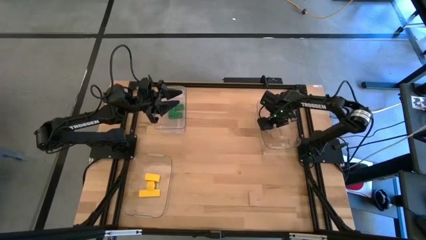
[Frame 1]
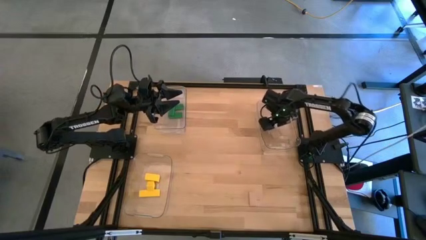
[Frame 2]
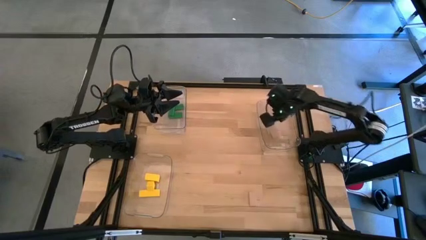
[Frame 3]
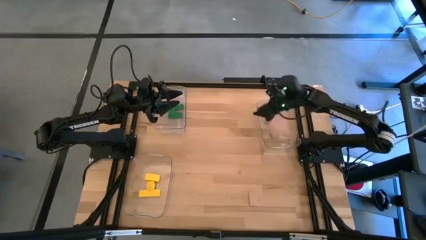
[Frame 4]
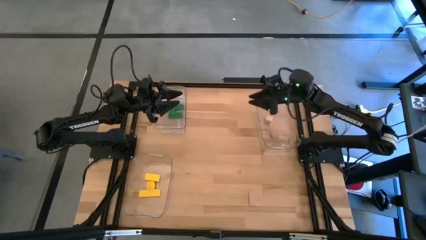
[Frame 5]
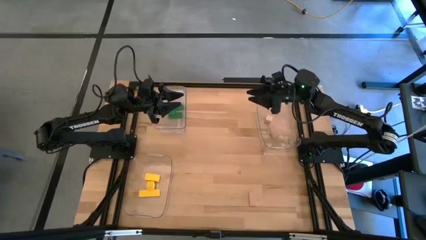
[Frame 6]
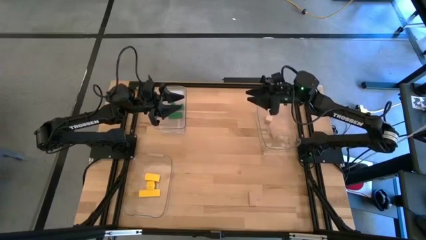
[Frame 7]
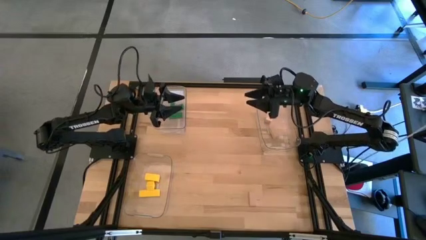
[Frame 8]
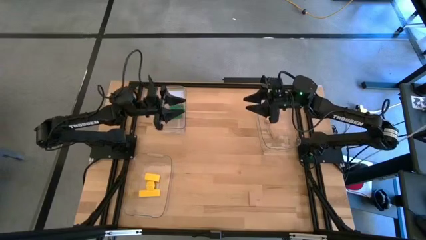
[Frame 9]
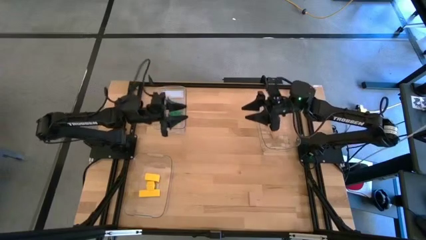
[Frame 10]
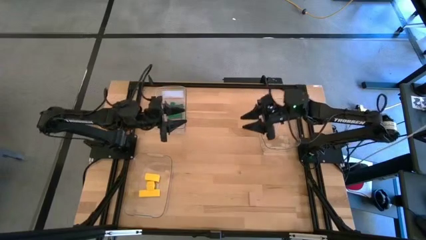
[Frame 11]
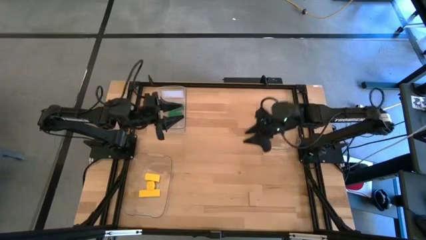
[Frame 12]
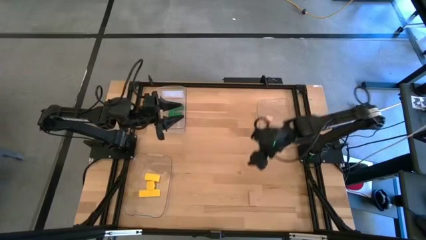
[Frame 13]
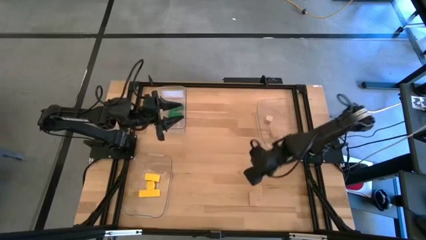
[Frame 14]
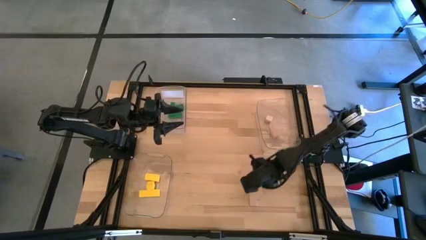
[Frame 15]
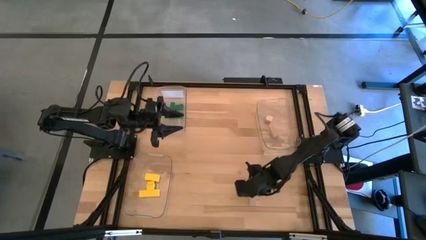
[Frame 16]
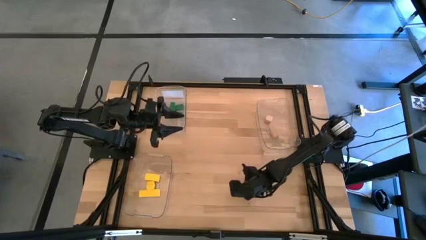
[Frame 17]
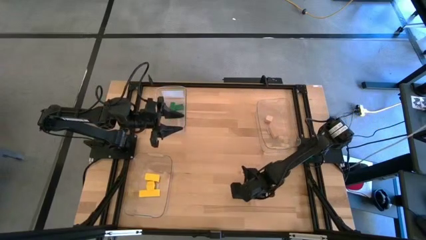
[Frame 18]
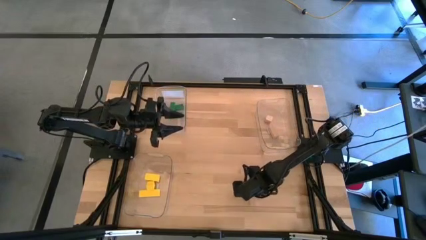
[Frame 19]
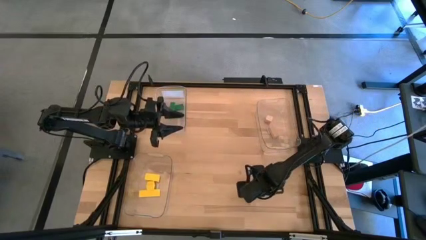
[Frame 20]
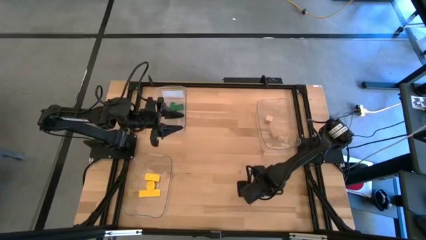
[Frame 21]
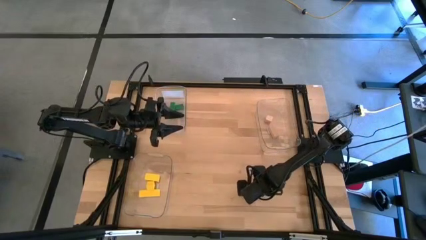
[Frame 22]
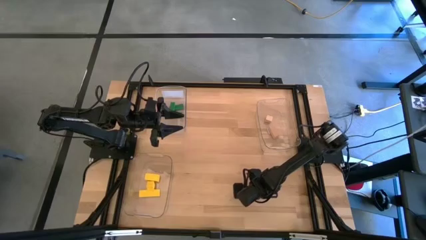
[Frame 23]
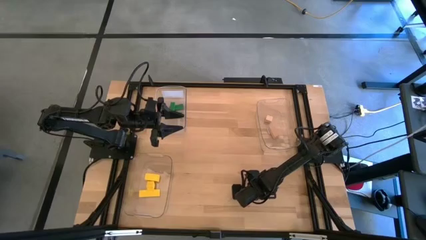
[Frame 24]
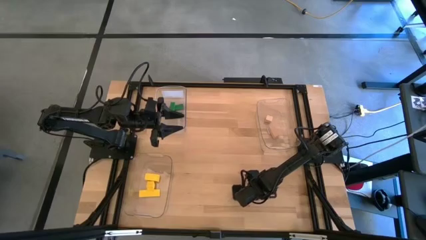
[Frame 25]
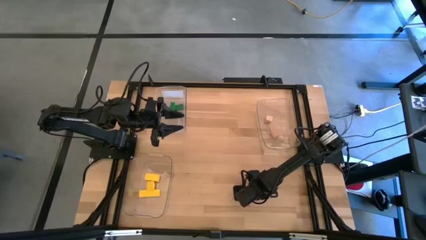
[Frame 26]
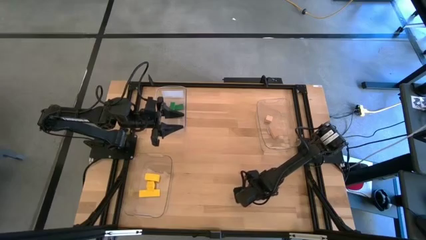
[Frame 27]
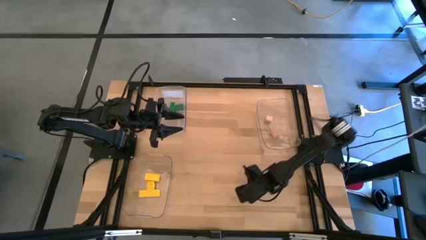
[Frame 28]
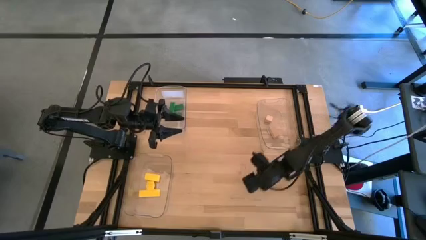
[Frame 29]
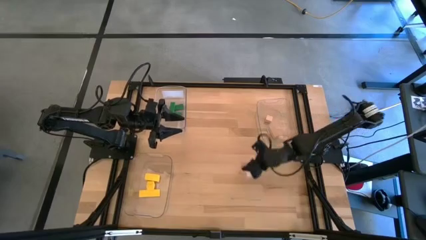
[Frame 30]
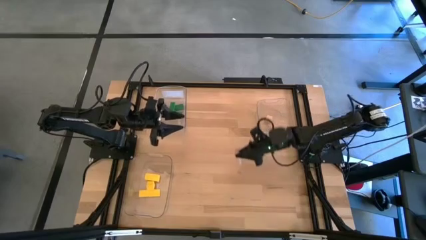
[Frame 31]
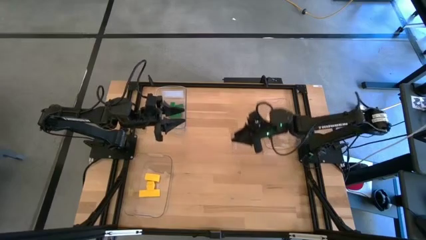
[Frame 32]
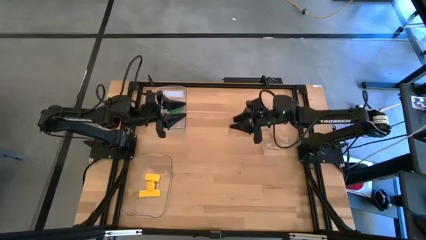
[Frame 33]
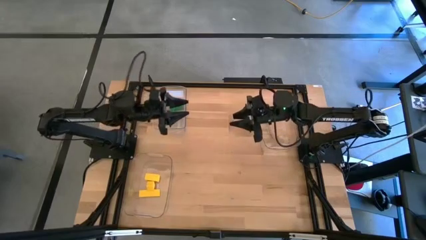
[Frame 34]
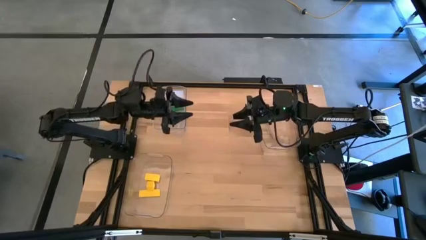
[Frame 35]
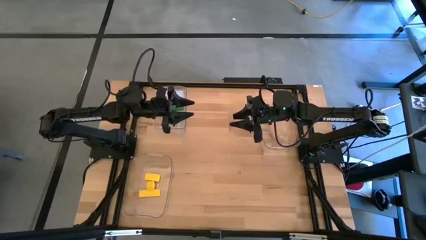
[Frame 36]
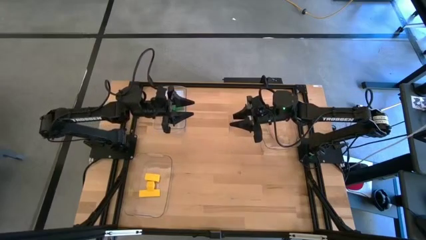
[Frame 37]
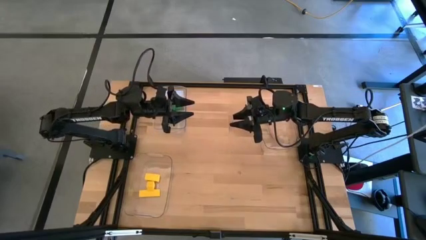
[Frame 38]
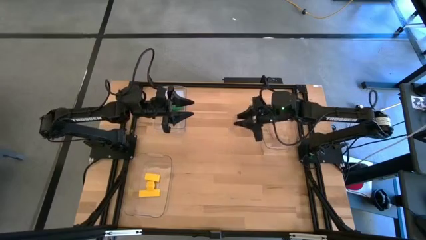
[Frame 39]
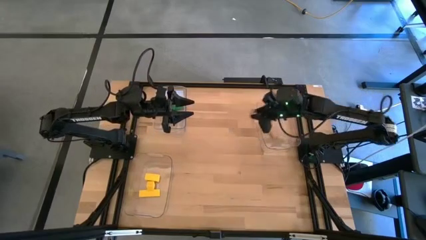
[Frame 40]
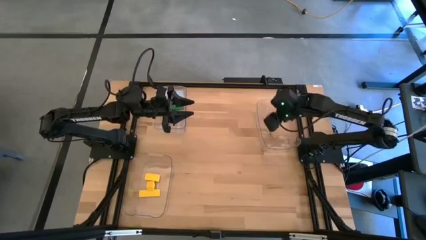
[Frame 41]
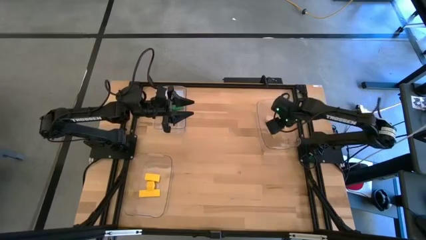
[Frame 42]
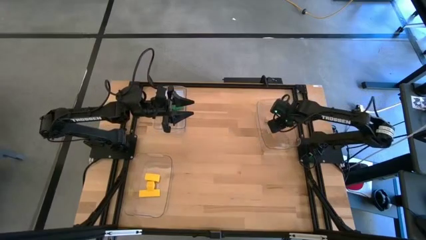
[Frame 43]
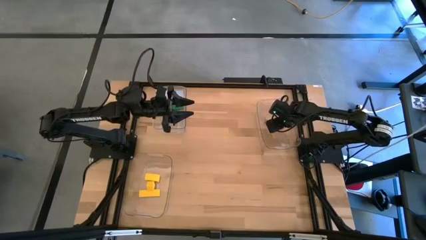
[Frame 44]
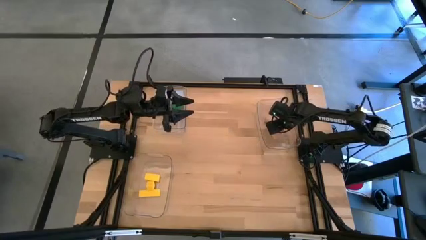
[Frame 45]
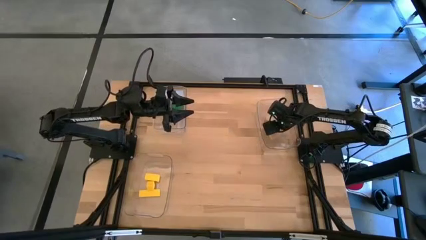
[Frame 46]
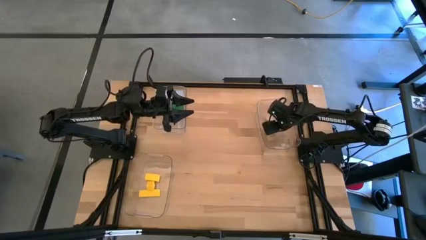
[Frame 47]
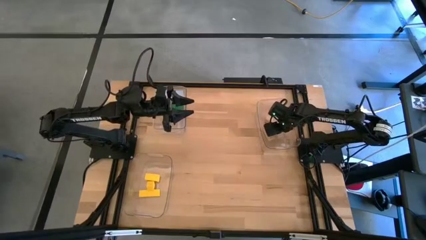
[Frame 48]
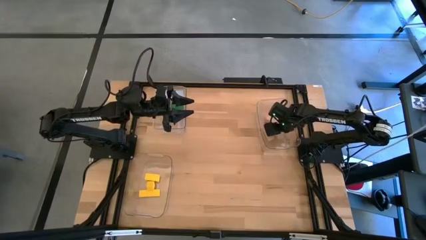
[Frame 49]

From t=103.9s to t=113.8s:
Task: Sort & place blocks by color
Put the brown block into the top right transparent bin

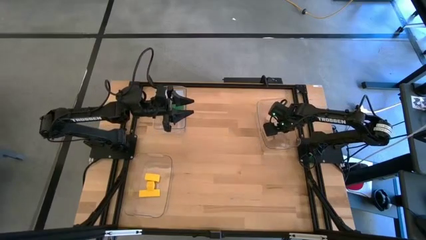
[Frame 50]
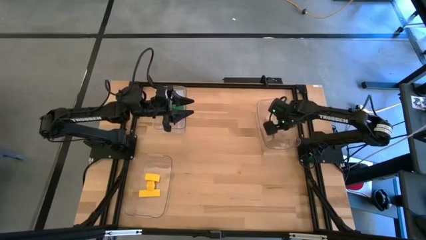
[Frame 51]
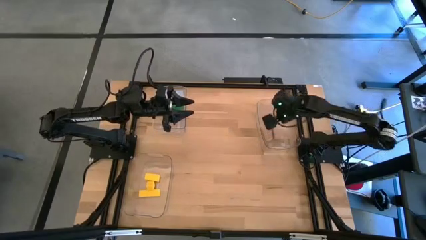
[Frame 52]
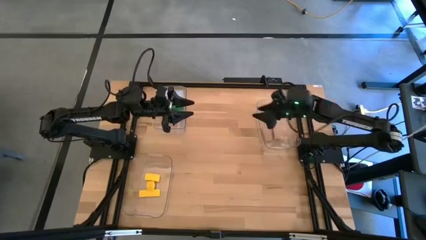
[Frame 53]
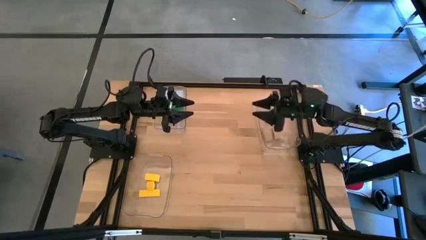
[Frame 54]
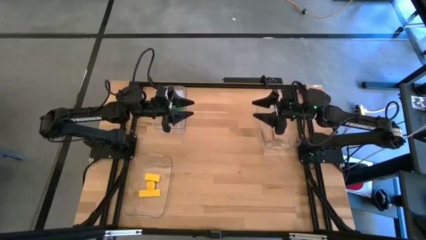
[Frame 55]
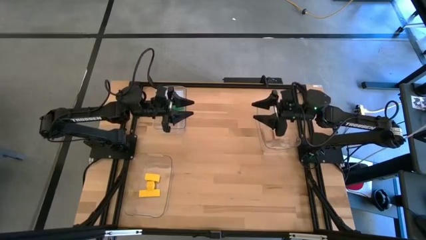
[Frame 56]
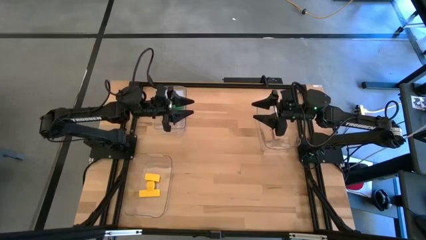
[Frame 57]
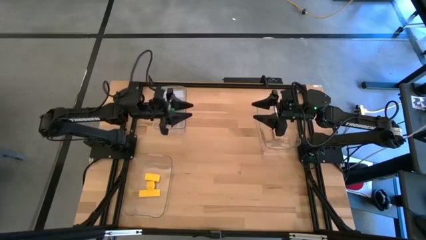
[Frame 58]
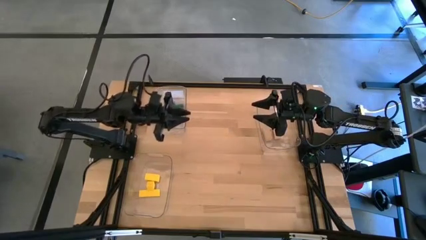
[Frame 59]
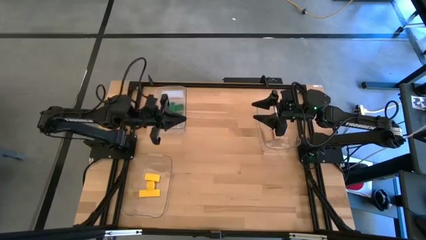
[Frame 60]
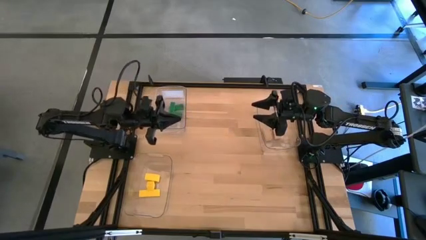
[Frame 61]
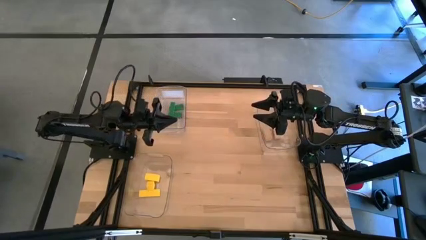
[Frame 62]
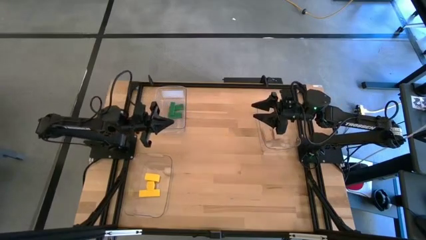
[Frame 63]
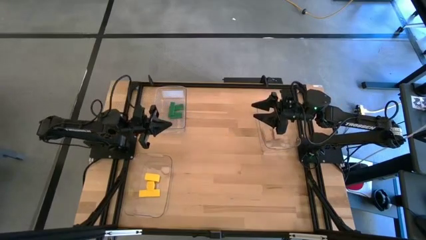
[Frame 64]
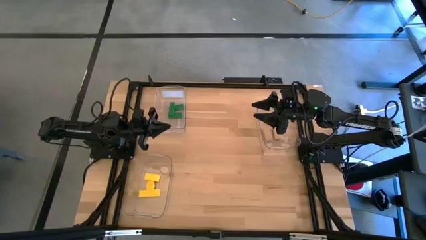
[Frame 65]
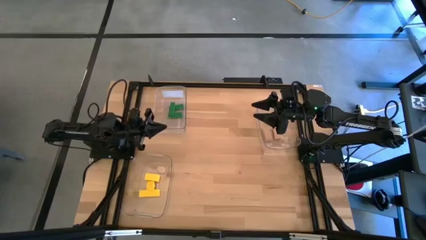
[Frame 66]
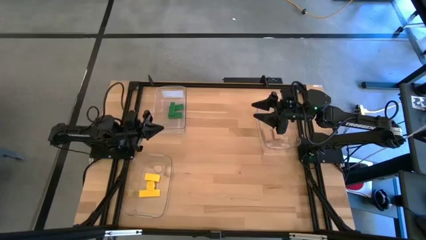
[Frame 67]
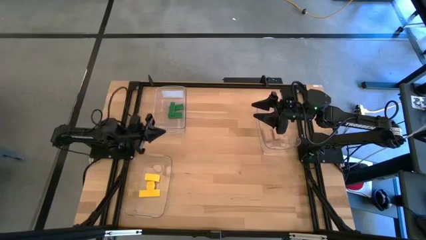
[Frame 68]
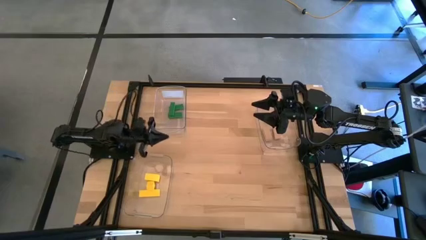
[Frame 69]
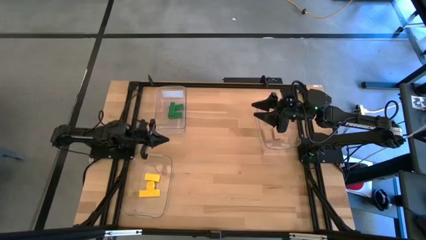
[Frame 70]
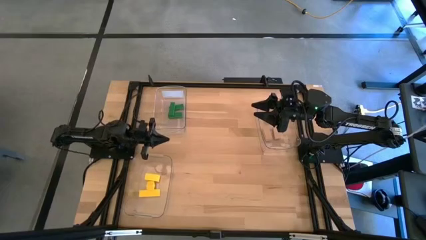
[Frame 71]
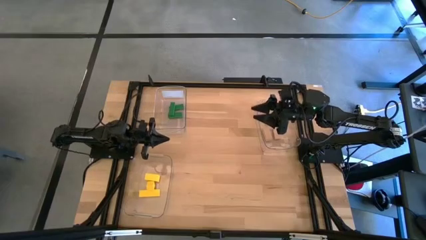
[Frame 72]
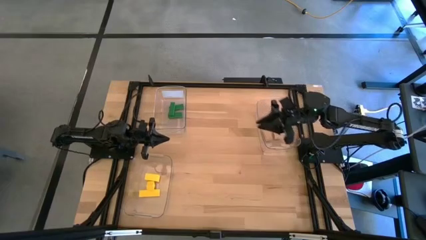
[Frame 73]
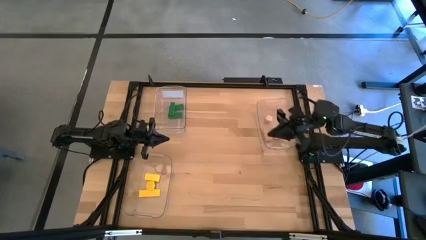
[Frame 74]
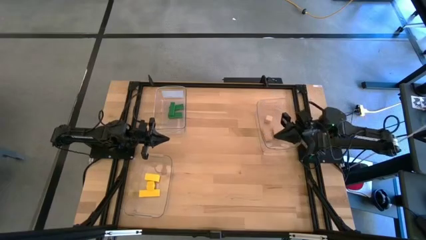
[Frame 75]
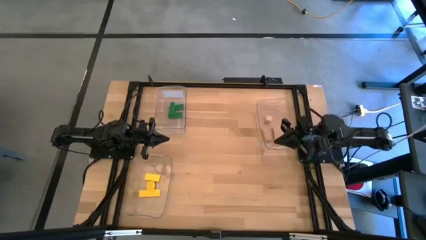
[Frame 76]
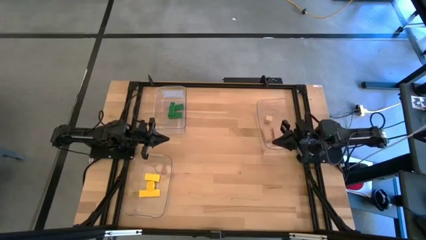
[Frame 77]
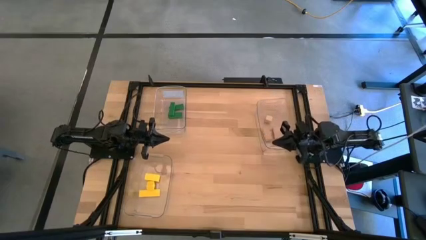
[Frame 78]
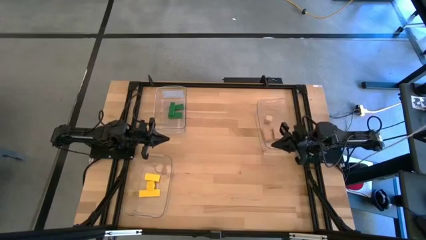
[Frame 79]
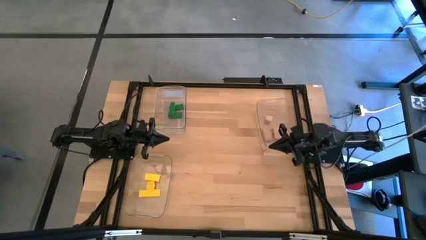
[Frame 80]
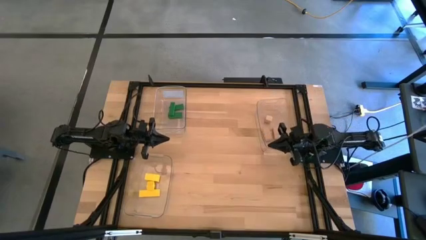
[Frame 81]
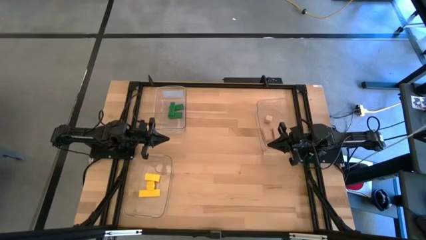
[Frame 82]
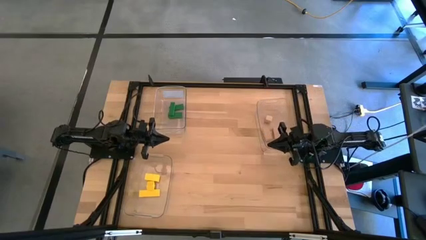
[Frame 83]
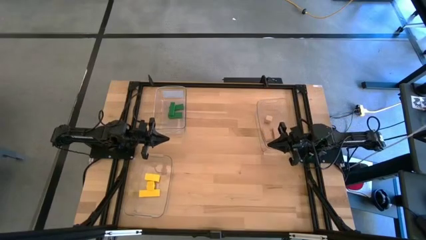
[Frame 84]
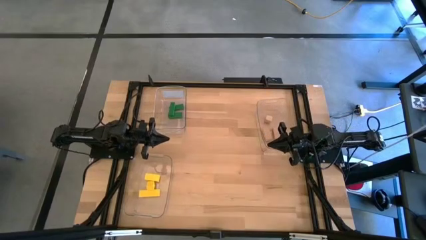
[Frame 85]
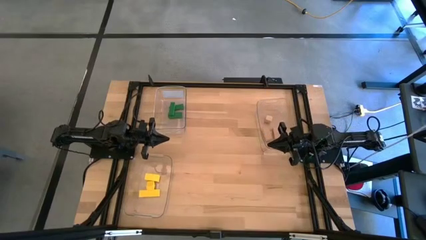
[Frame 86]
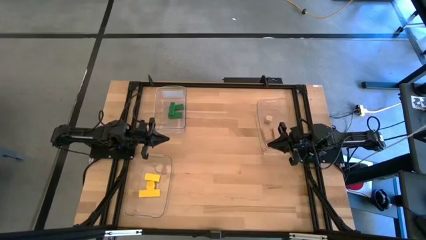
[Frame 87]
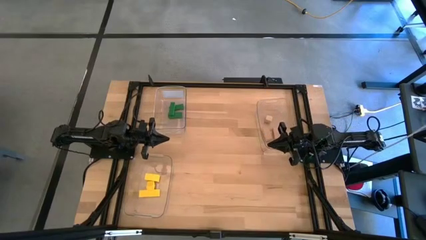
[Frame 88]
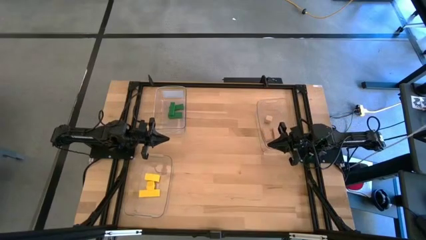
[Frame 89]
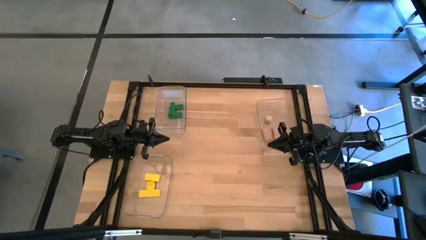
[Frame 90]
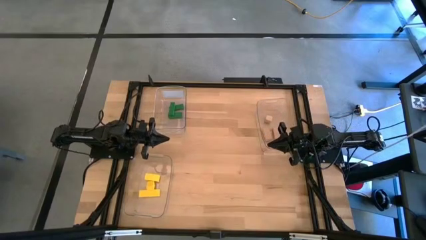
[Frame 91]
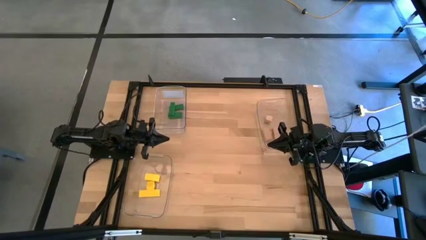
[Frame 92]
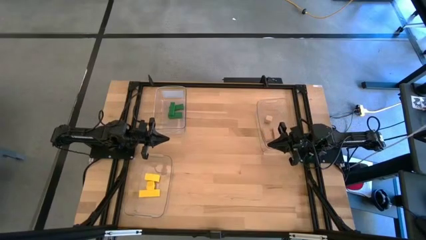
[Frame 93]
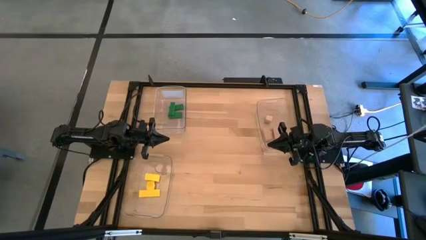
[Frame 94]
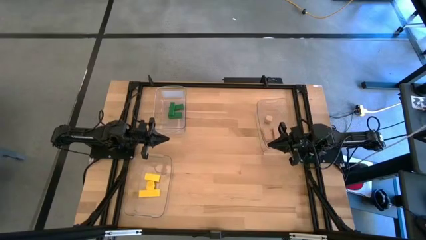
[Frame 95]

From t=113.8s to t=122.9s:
Return to Home Position
